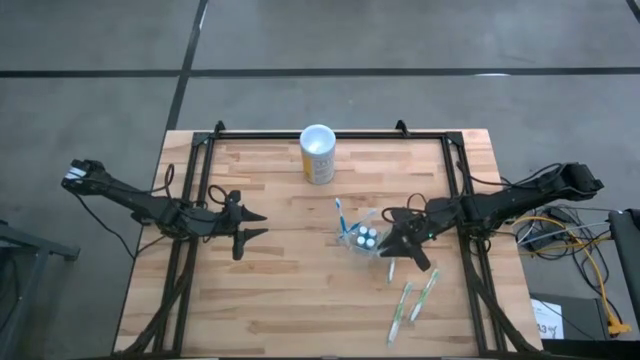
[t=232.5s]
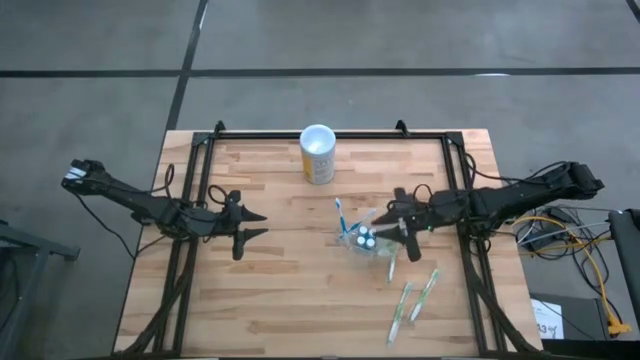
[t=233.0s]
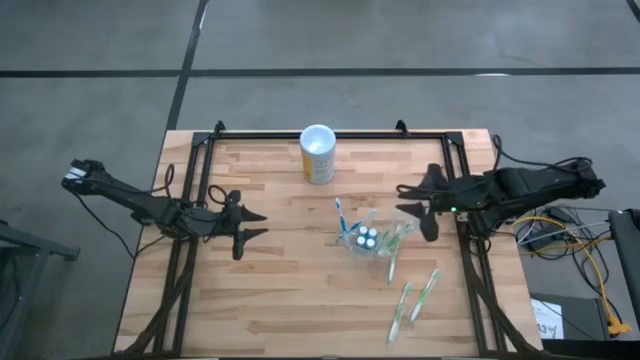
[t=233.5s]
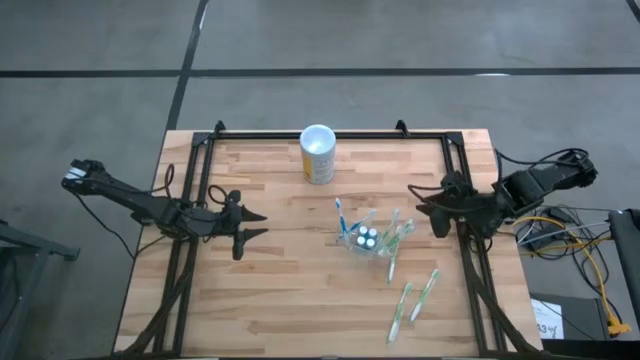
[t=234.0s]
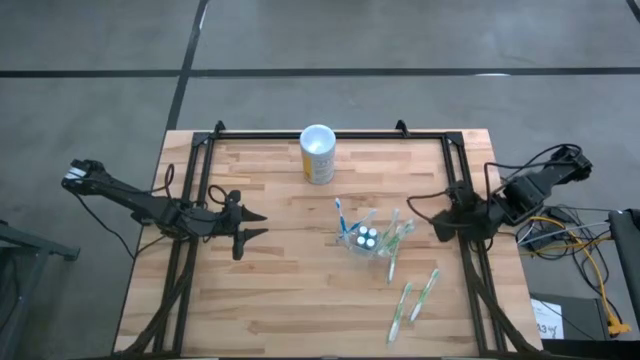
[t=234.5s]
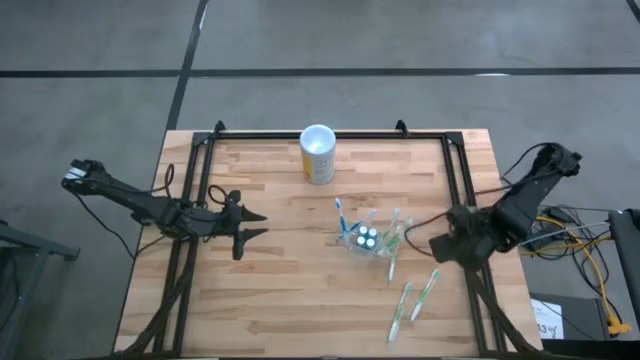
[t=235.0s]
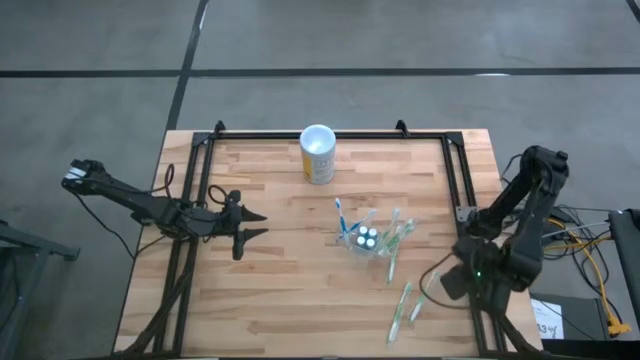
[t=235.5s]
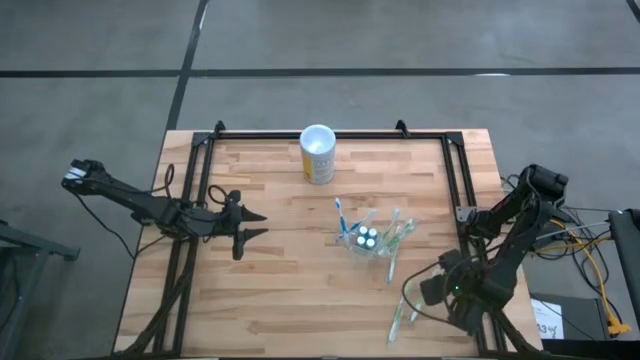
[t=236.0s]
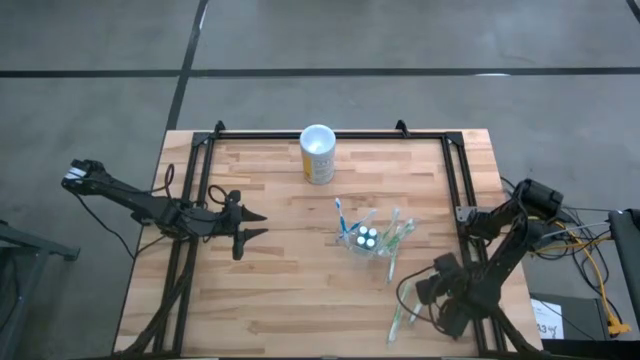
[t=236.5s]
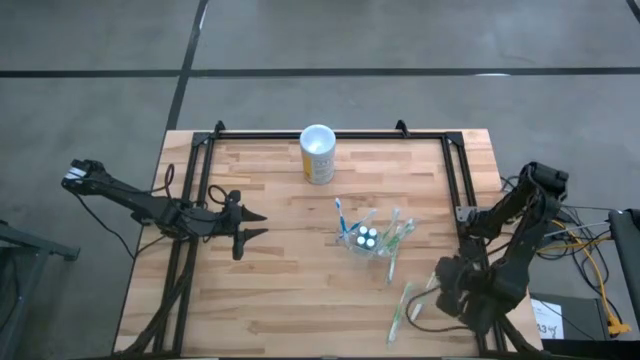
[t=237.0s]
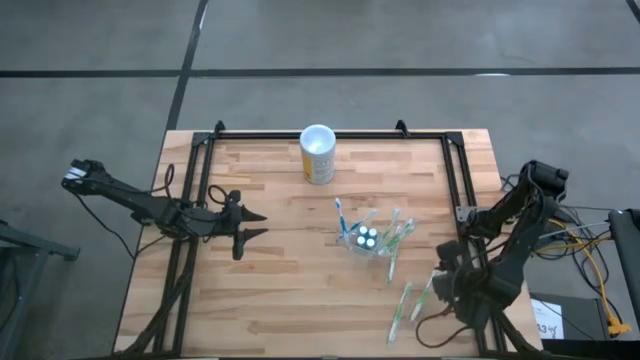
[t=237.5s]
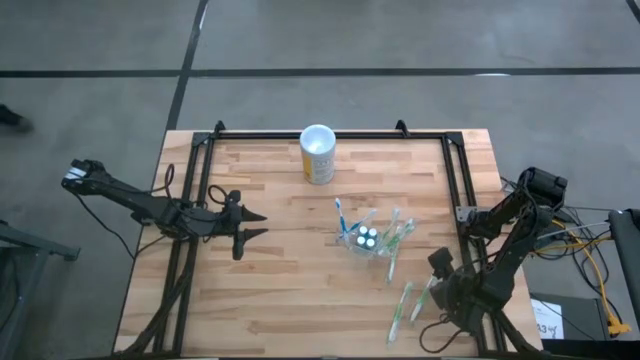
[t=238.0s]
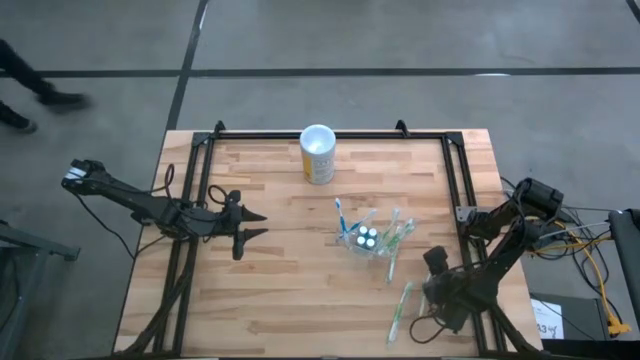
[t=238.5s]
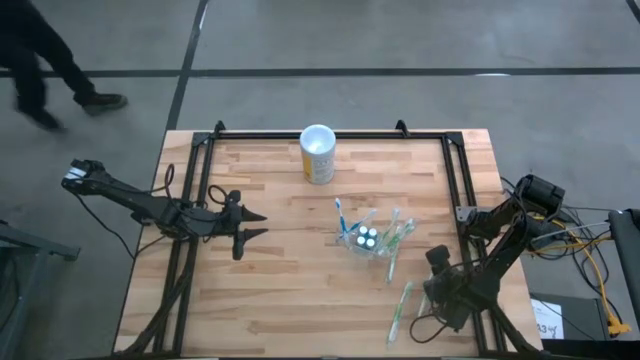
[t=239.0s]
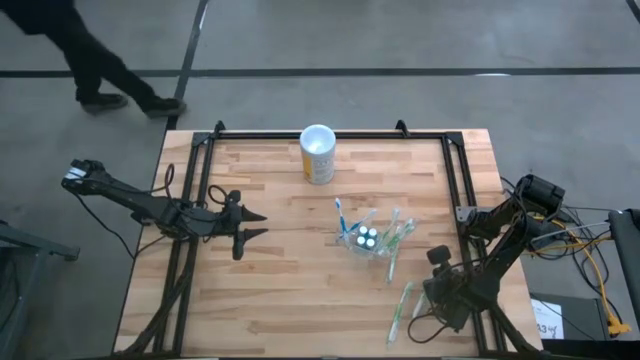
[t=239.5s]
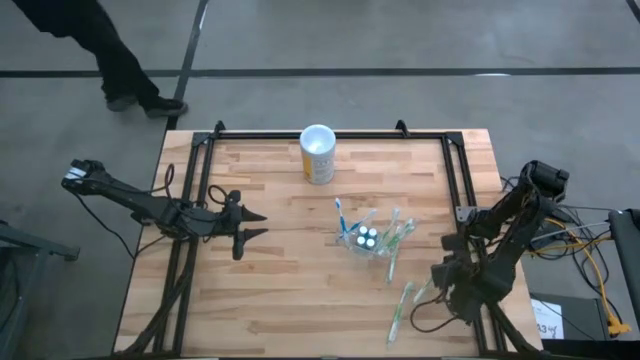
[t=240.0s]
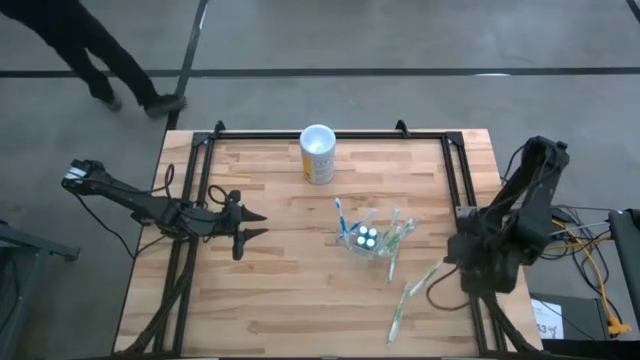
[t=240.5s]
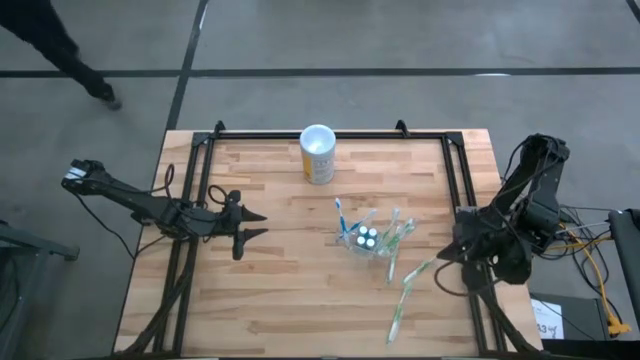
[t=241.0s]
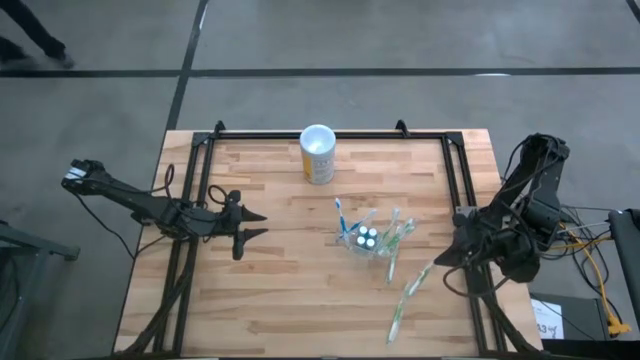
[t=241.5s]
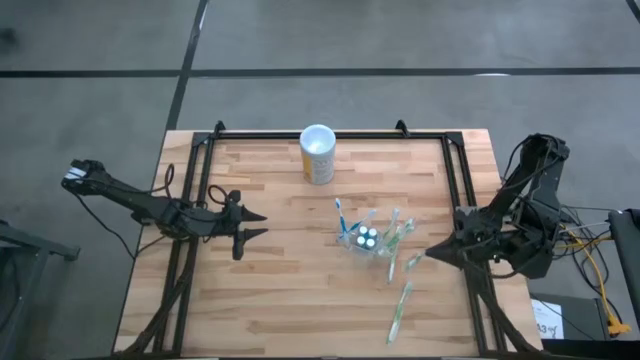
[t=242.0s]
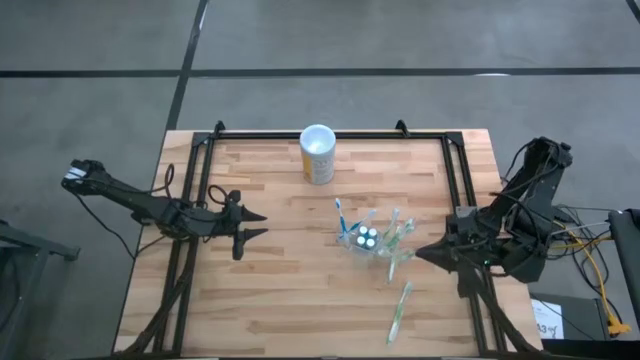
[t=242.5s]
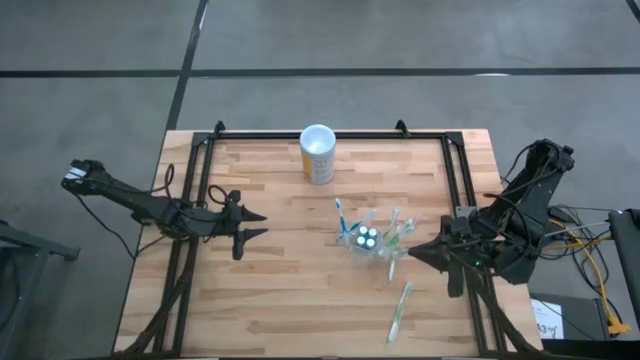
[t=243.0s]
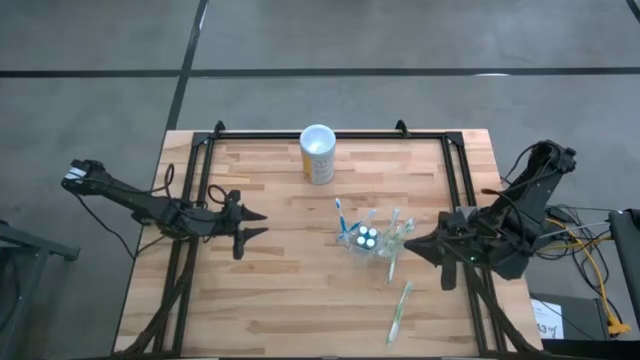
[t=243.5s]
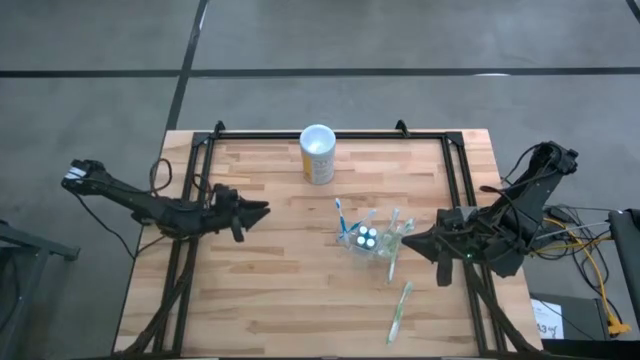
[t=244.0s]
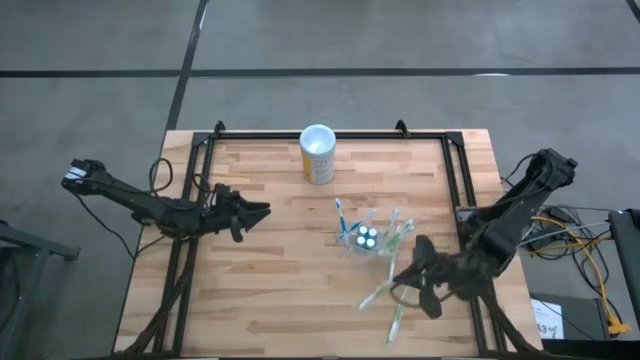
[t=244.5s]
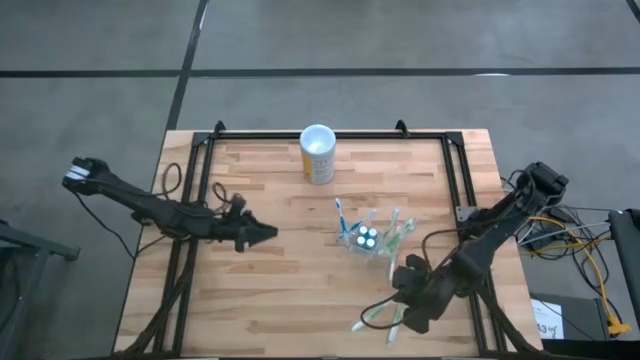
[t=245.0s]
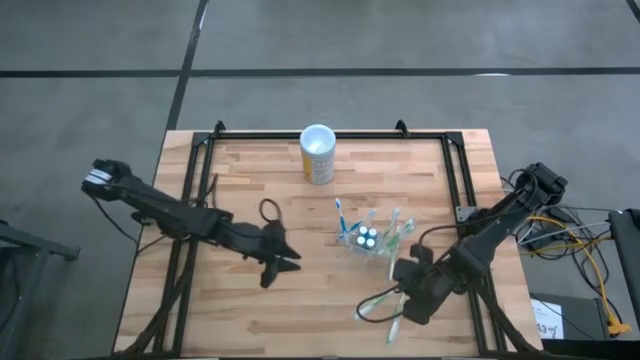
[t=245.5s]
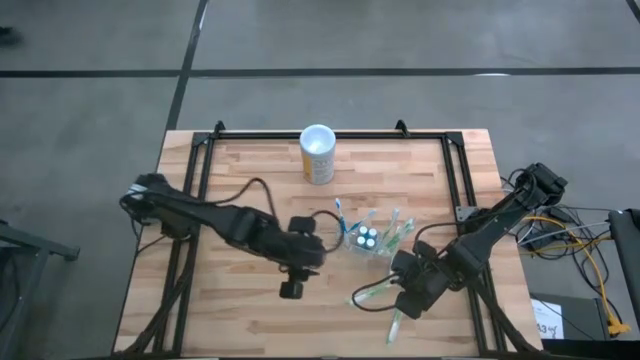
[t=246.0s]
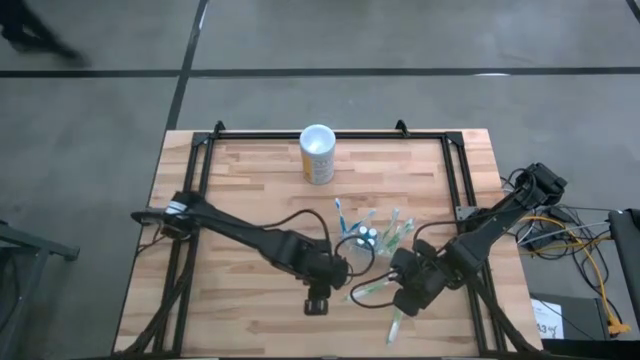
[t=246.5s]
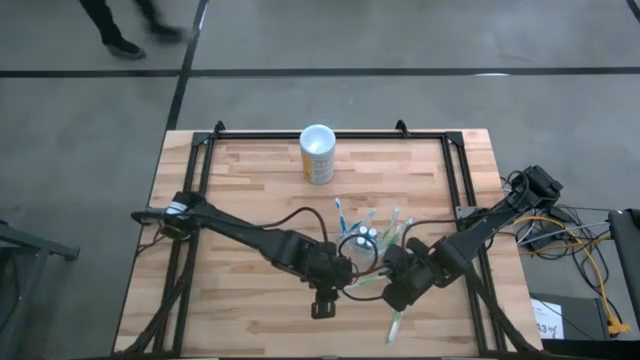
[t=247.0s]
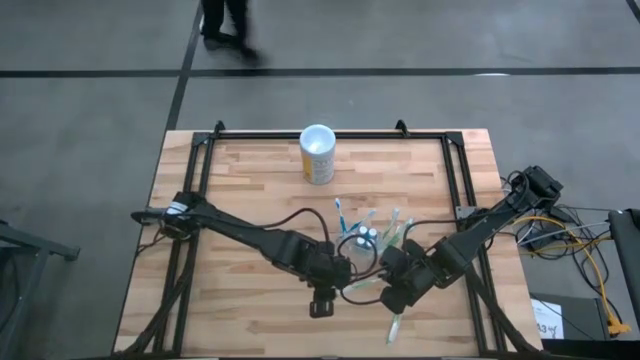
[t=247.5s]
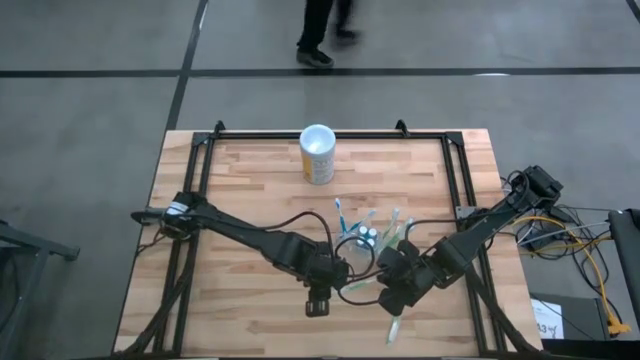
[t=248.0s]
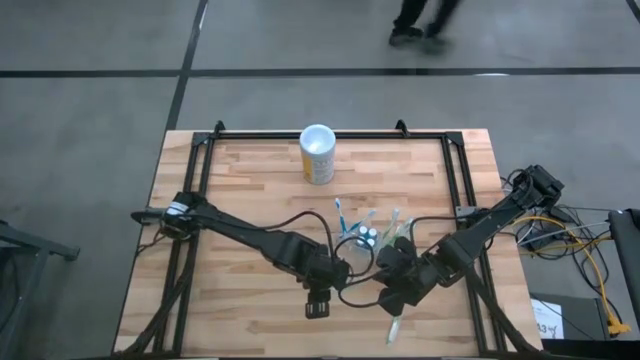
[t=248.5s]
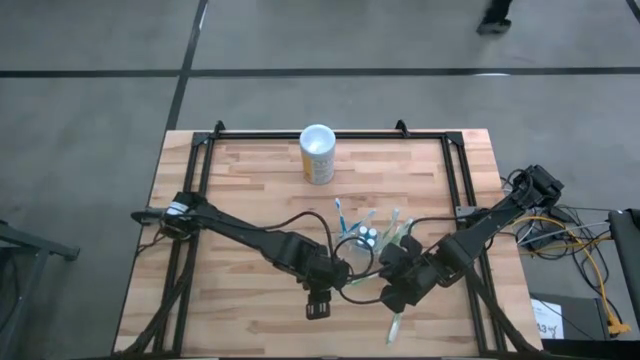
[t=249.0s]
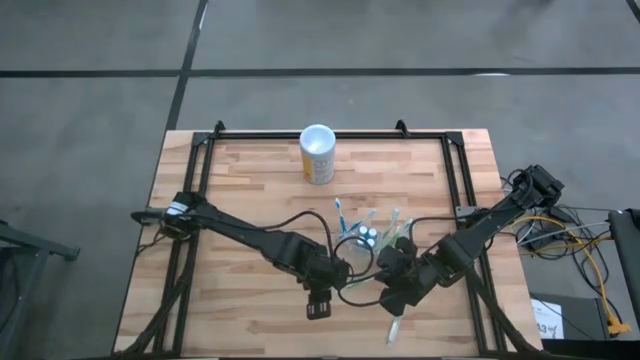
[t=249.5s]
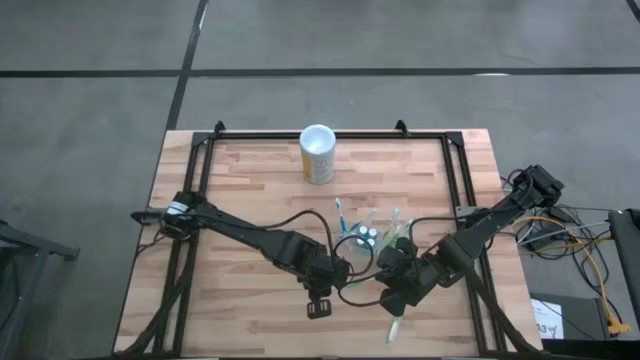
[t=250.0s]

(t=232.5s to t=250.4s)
Task: Pick & Place toothbrushing station
Put the green toothbrush into the right section of the transparent organizer

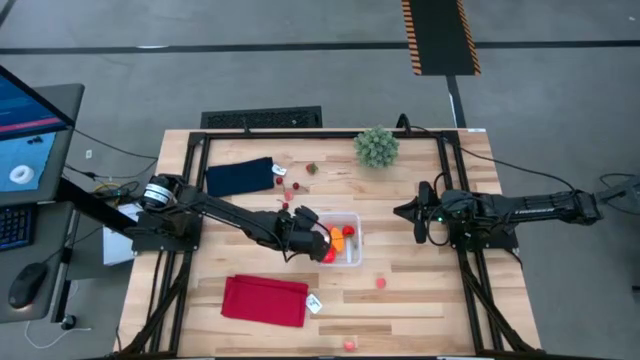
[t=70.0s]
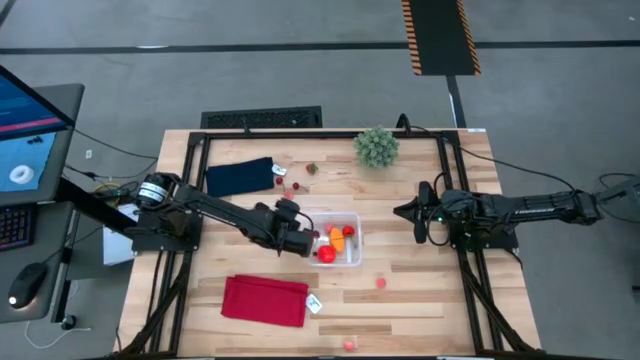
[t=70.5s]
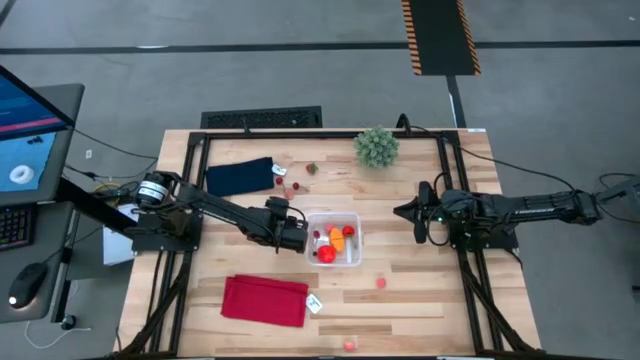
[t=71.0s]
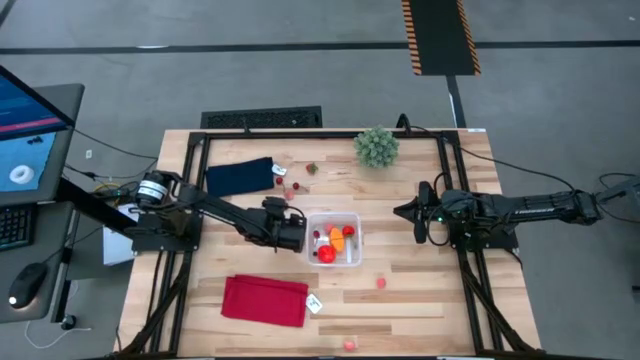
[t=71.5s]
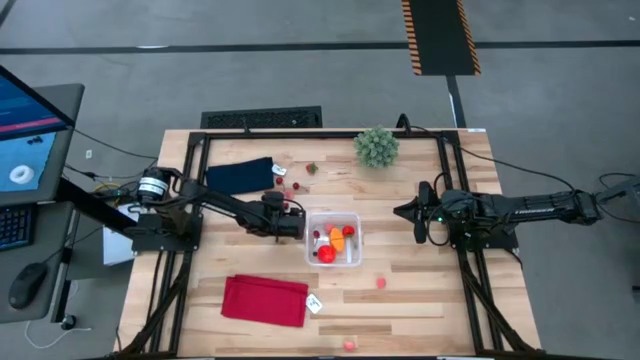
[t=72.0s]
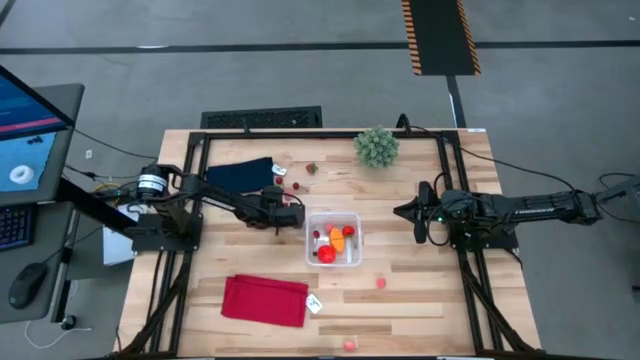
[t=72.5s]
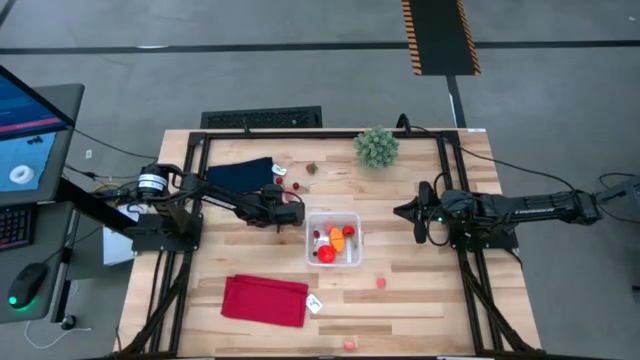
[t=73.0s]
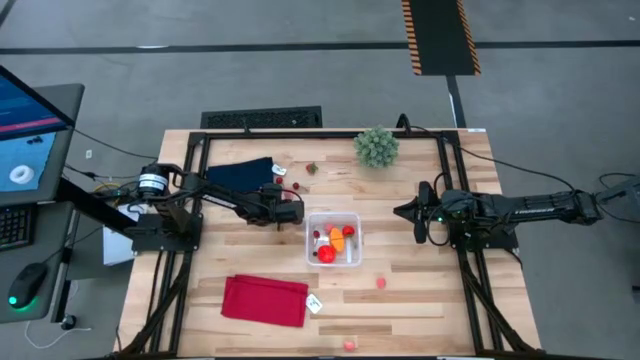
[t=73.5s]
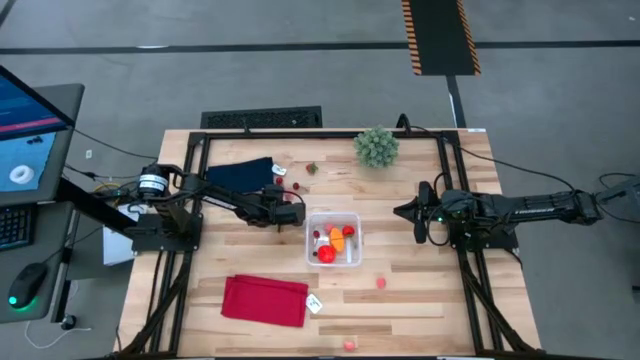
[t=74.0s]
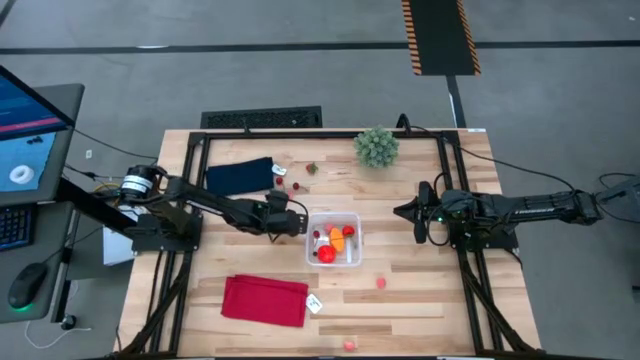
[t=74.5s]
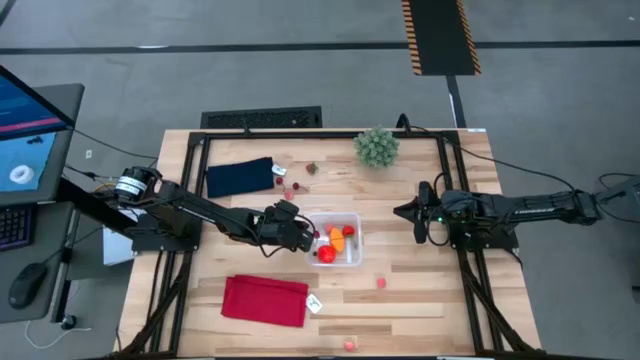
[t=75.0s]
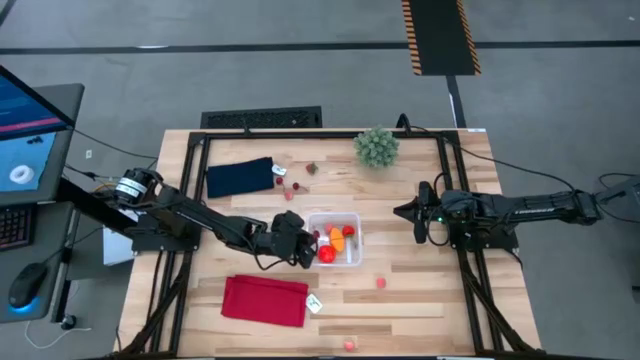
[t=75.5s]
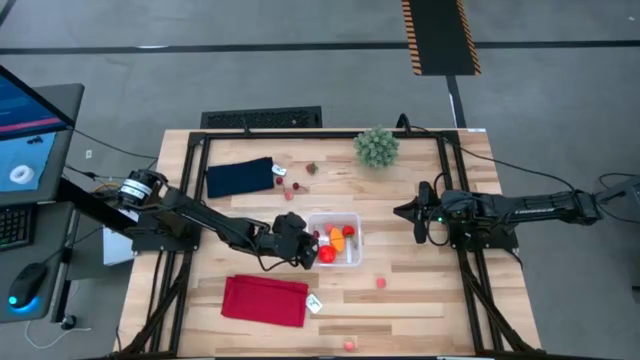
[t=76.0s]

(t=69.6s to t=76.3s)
Task: Pick and placing Produce into tupperware
Put the red cherry into the transparent bin
